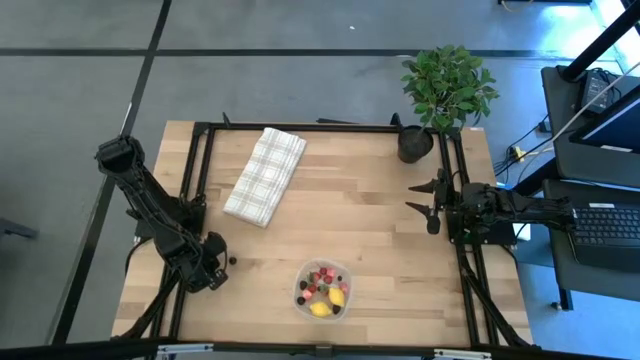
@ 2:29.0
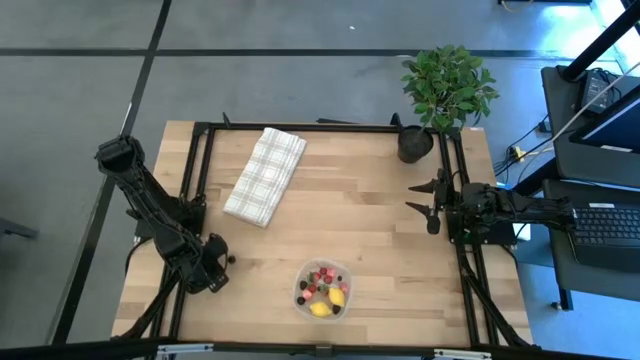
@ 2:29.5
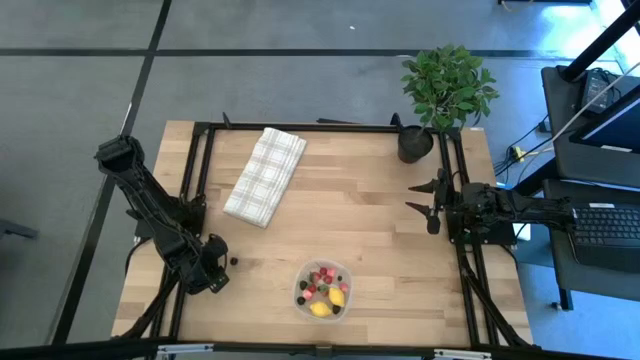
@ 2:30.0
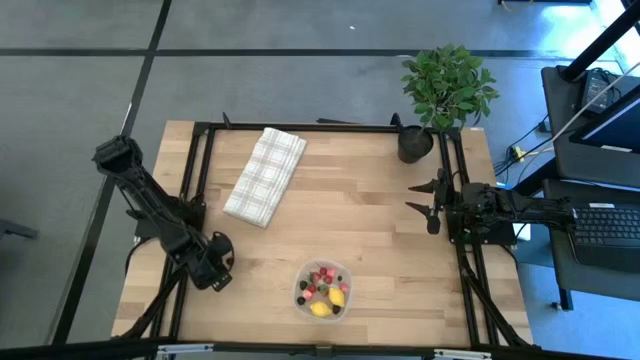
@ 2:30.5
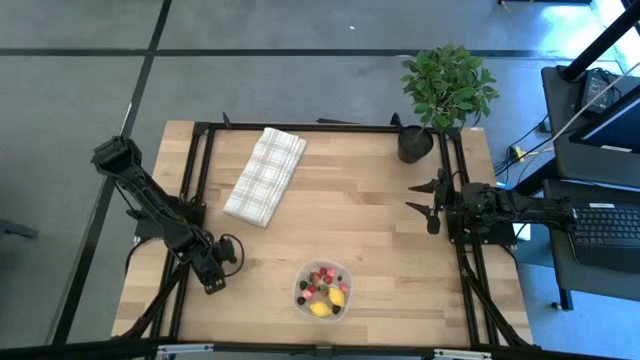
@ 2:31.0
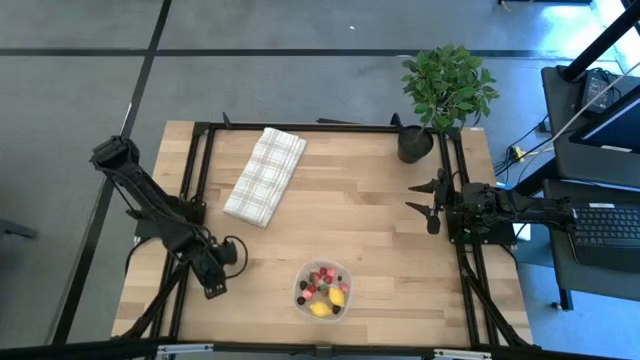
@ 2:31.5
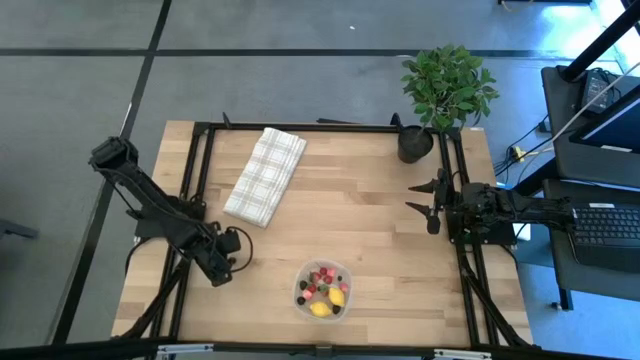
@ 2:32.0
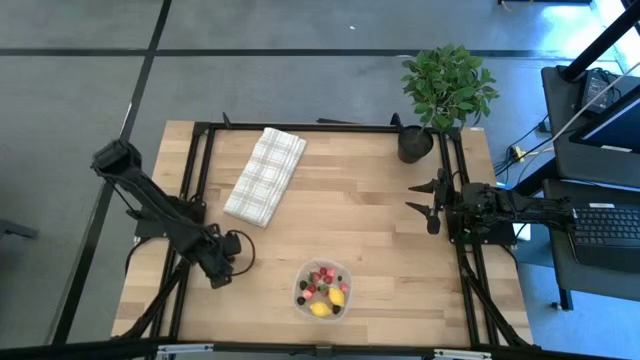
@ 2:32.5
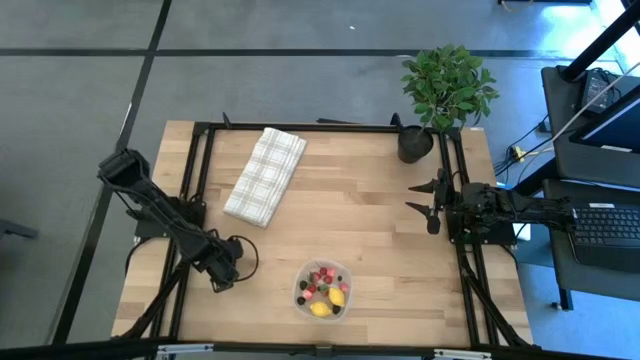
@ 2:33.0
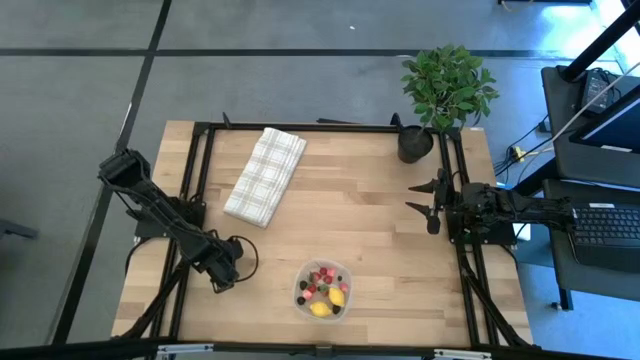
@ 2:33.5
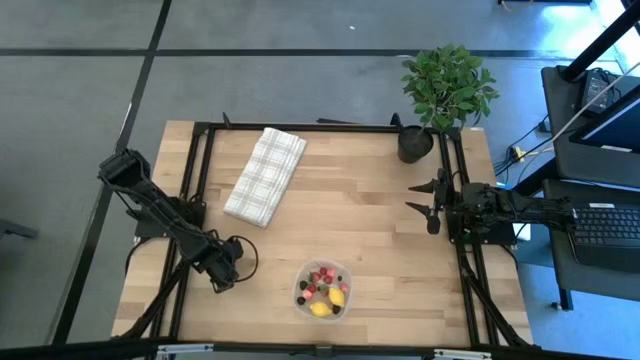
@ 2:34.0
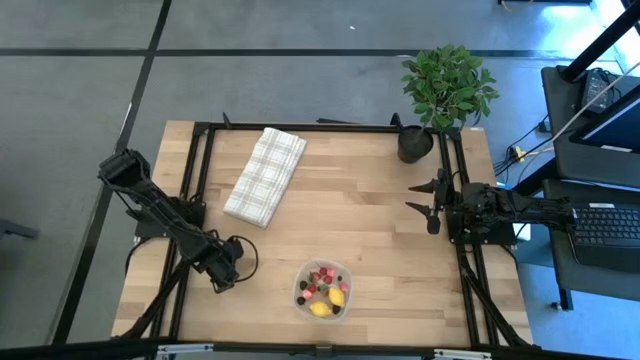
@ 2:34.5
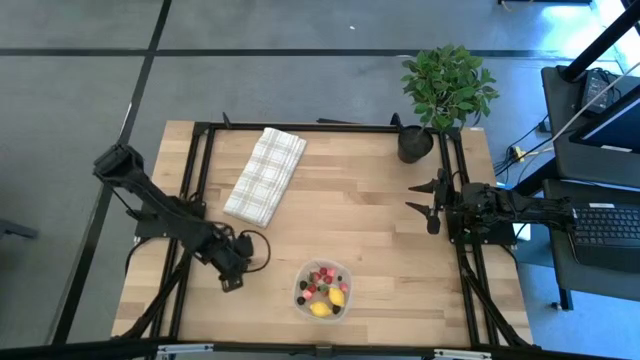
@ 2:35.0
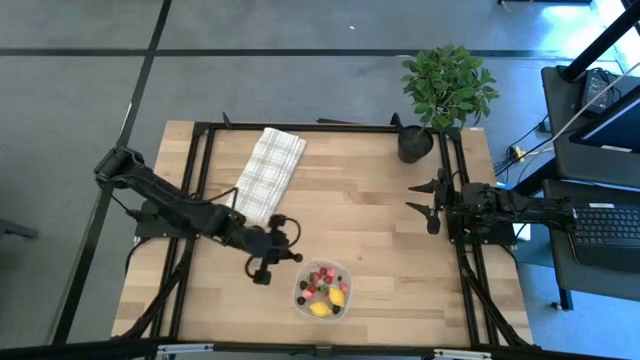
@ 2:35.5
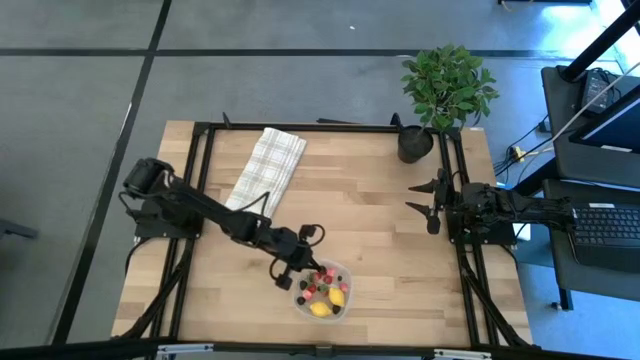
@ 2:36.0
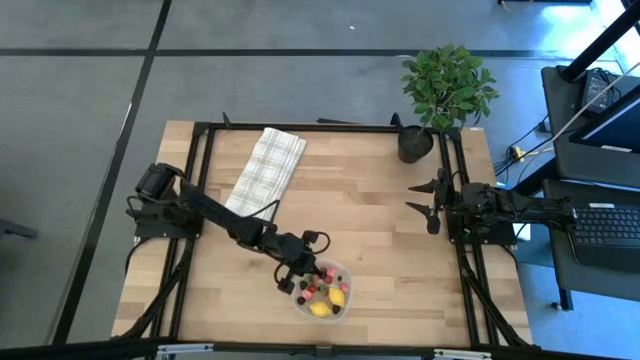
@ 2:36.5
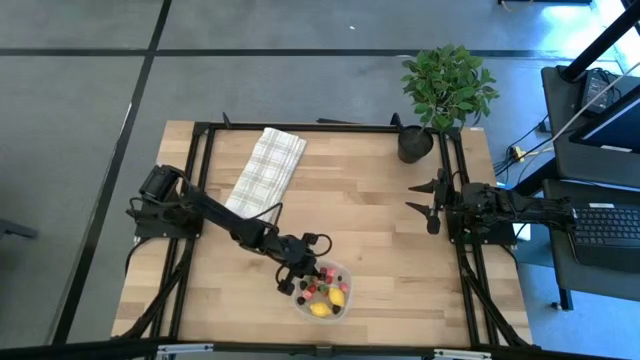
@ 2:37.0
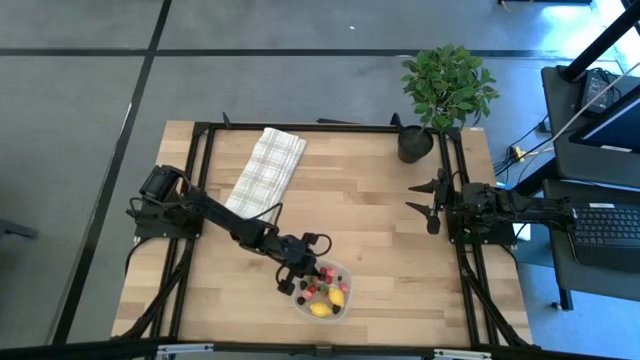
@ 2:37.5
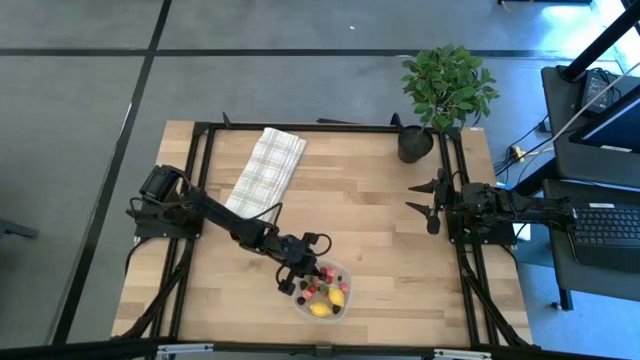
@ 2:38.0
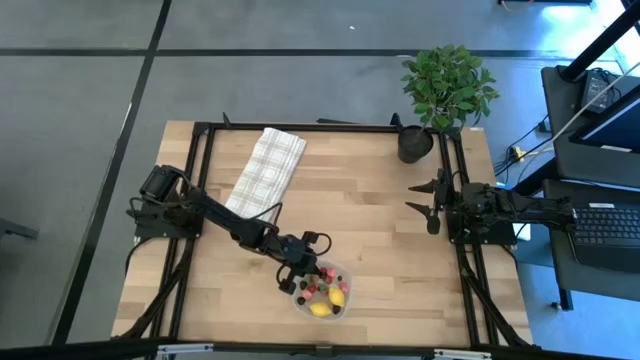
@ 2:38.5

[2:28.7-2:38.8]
Task: Pick and placing Produce into tupperware
Put the black cherry into the transparent bin

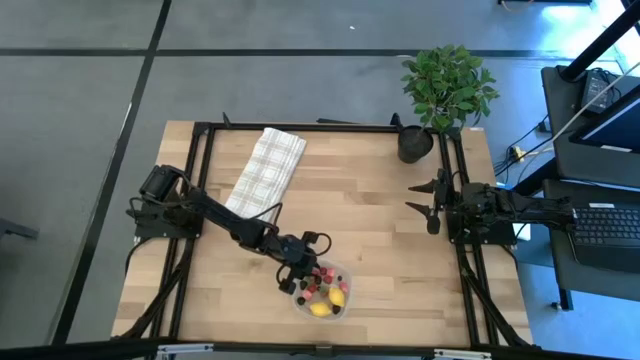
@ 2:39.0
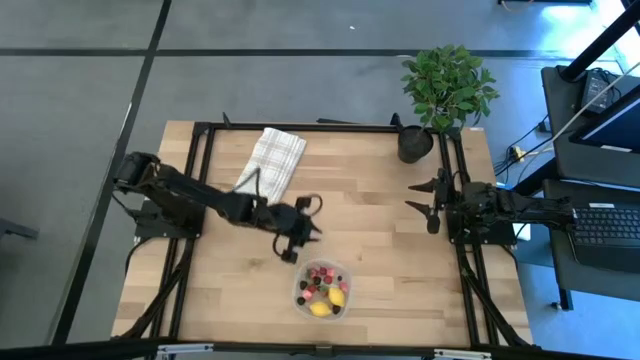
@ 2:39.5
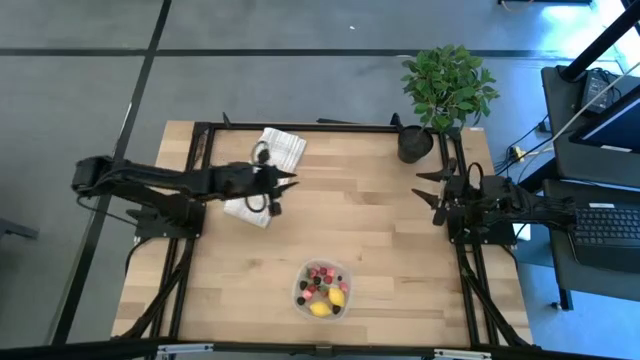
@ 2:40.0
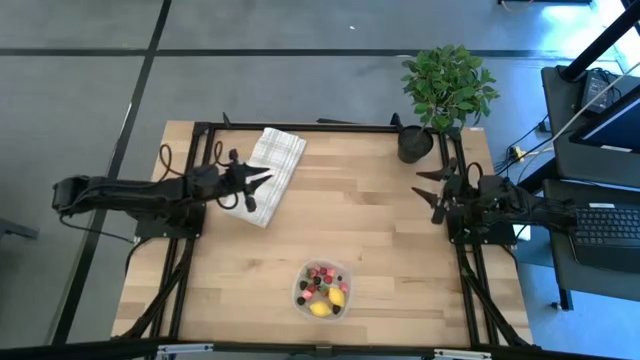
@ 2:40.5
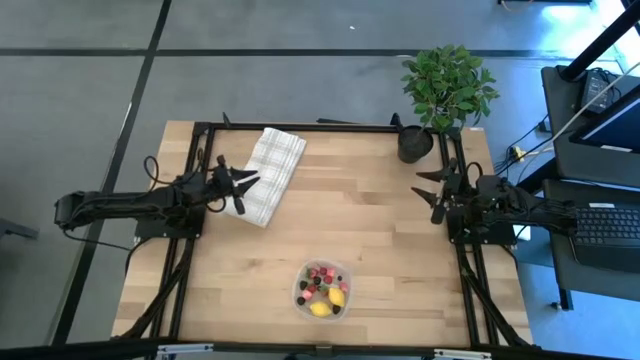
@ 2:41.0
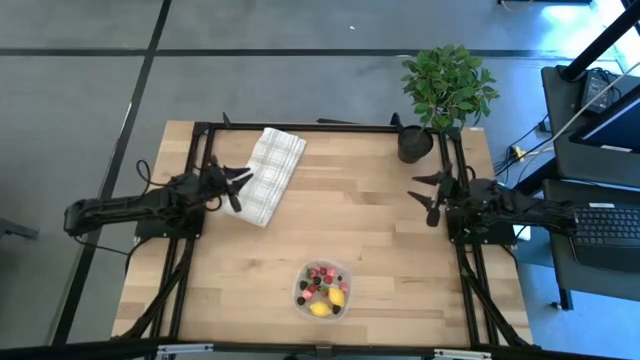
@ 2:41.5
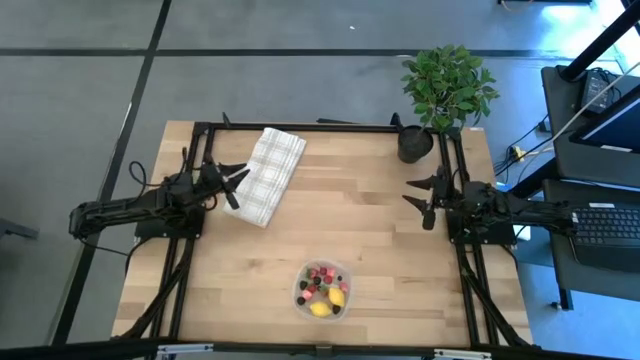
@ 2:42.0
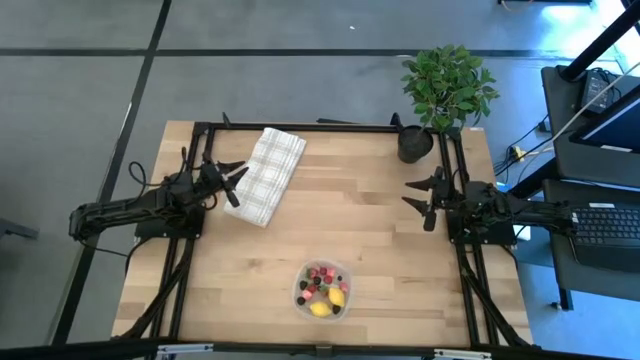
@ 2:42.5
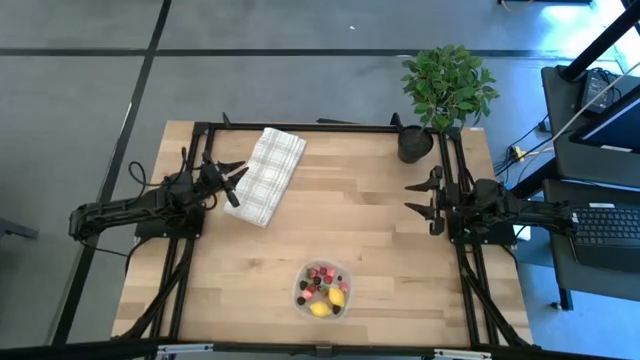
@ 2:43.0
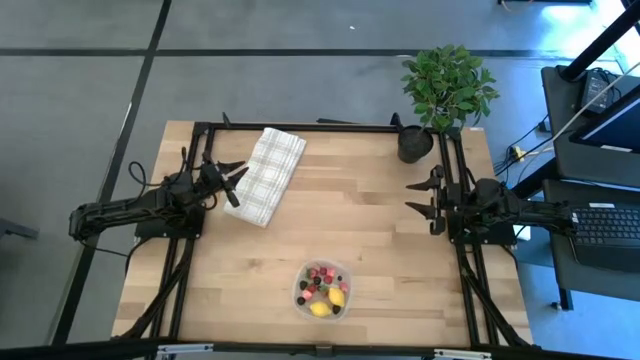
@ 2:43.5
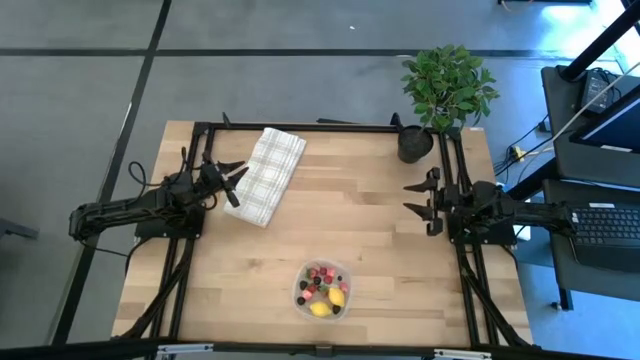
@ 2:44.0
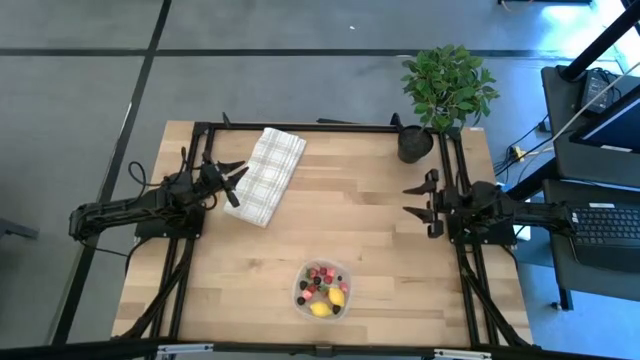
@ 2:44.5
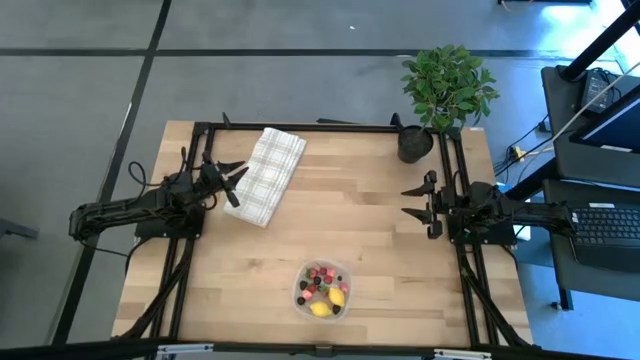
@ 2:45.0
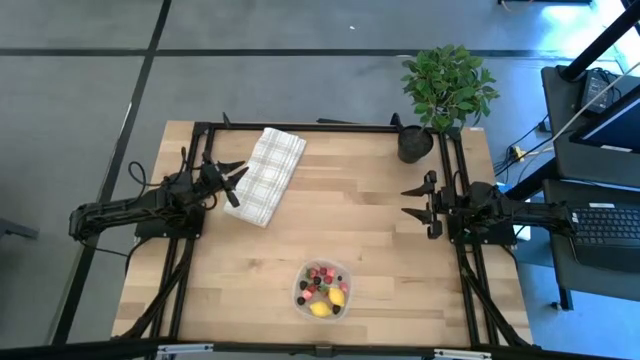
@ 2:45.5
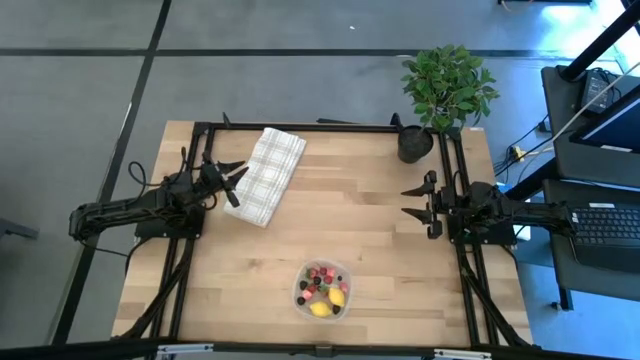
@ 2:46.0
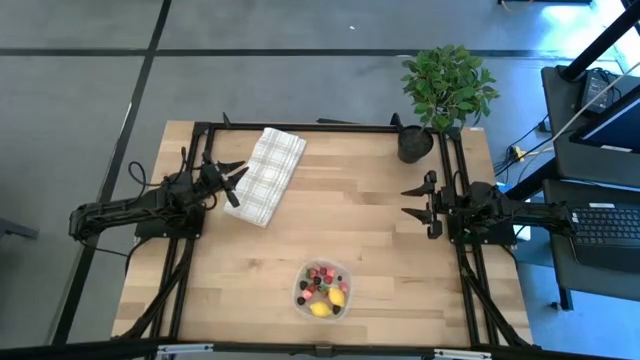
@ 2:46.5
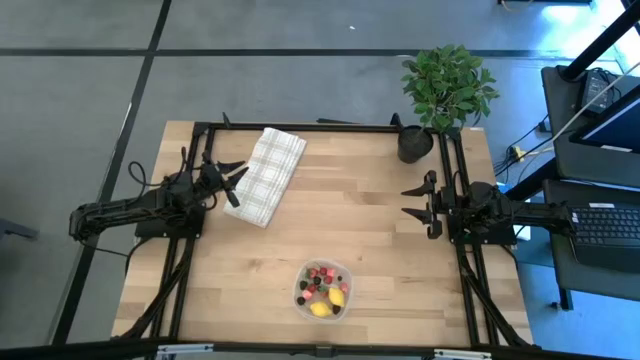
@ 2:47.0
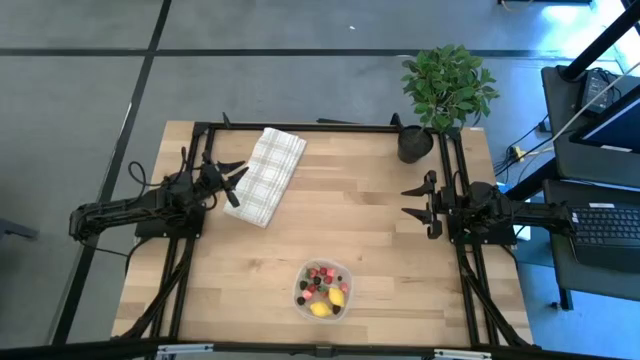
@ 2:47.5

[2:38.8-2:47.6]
Return to Home Position

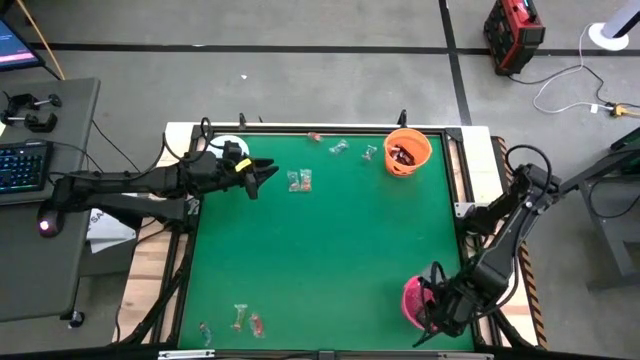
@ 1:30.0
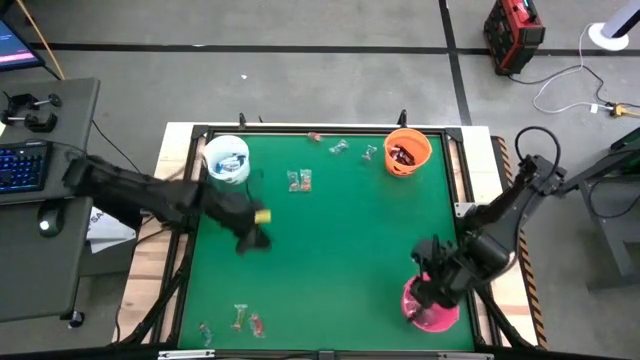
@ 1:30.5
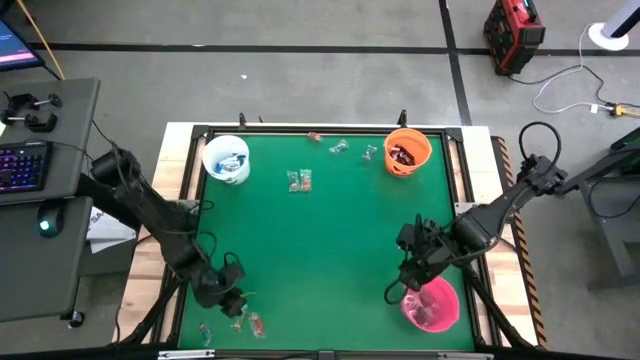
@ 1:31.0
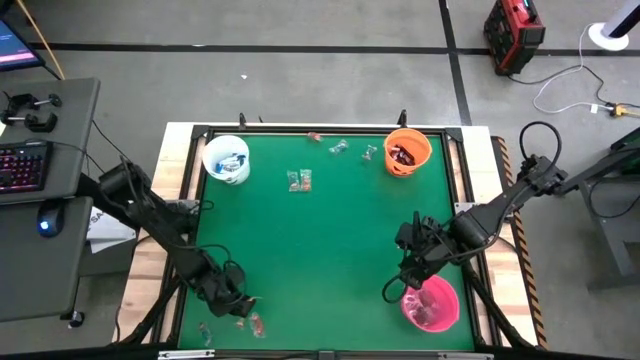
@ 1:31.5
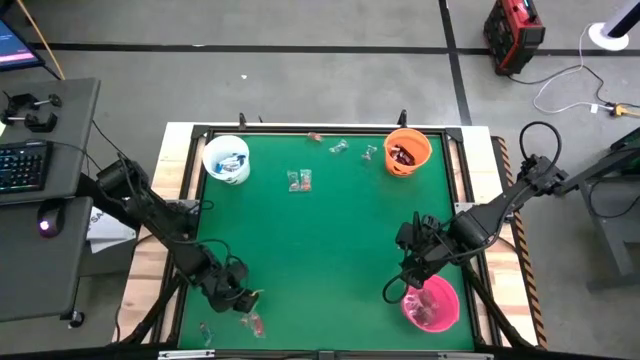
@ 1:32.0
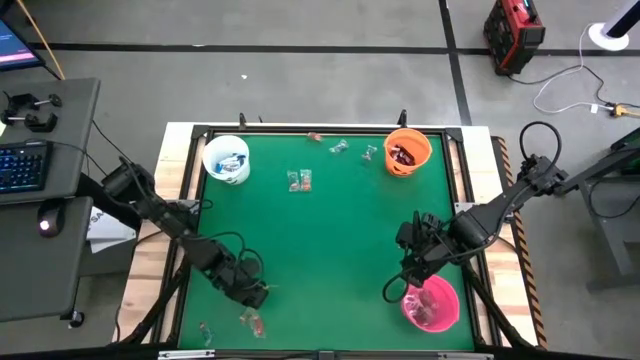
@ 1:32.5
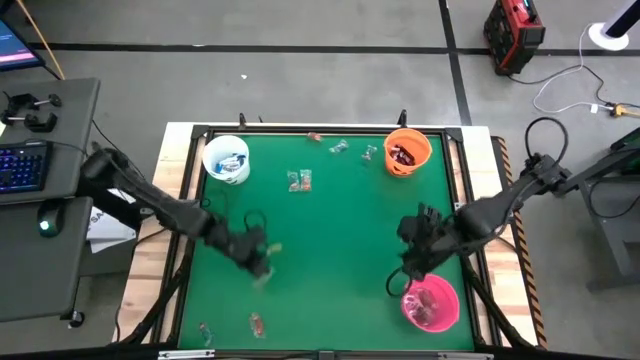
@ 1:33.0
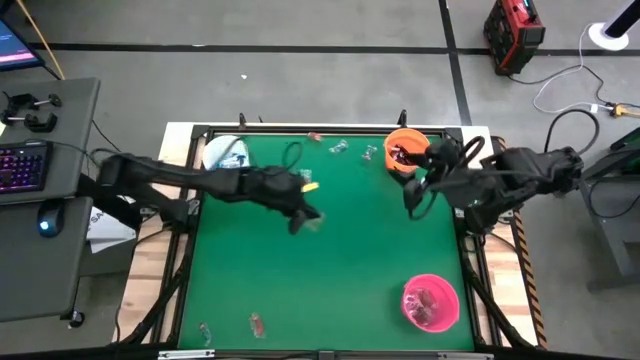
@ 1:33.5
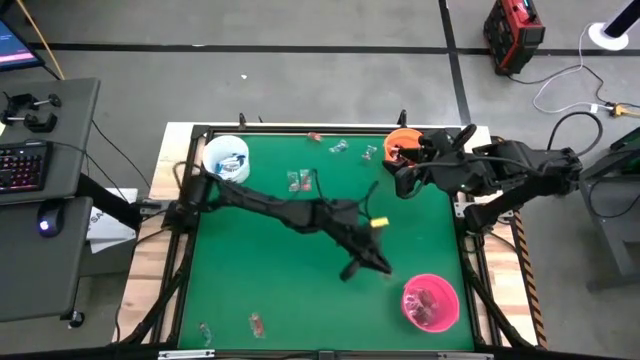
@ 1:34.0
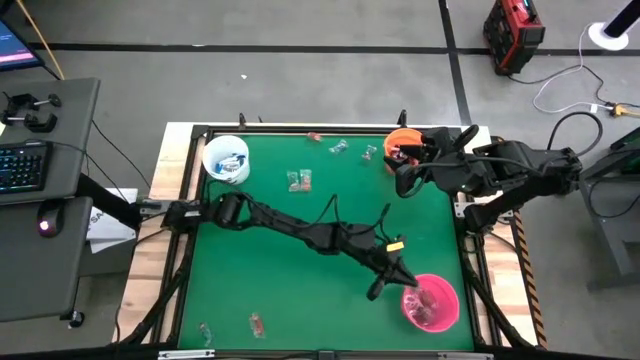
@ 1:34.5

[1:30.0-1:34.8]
Task: Sort candy by brand, put in halloween buckets
Put the green gummy into the pink bucket
